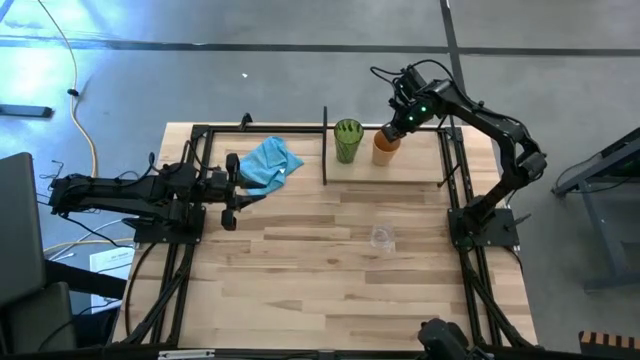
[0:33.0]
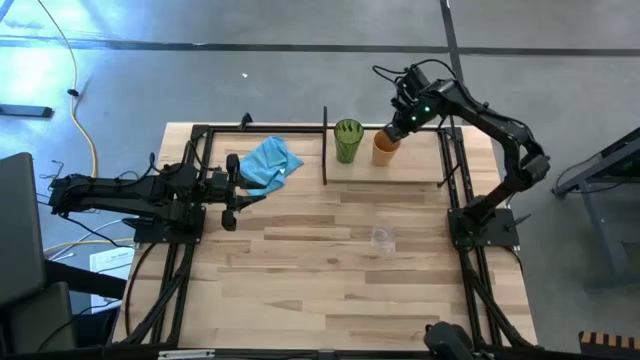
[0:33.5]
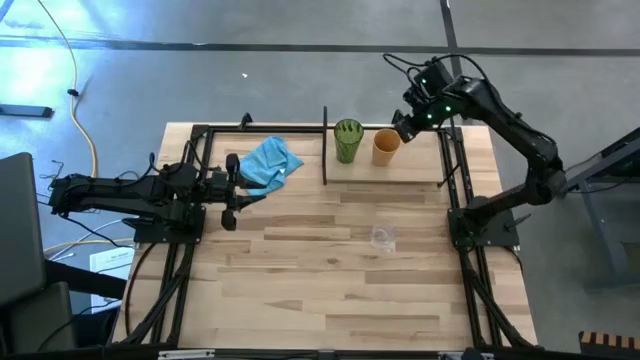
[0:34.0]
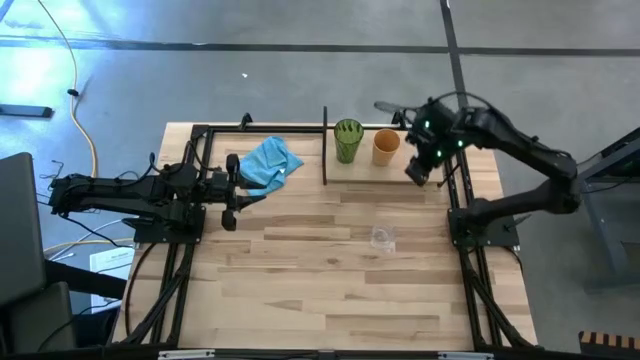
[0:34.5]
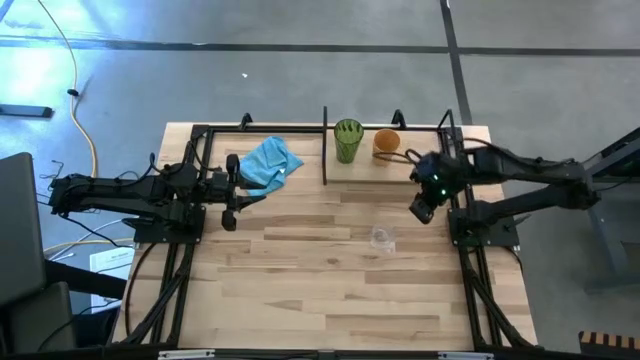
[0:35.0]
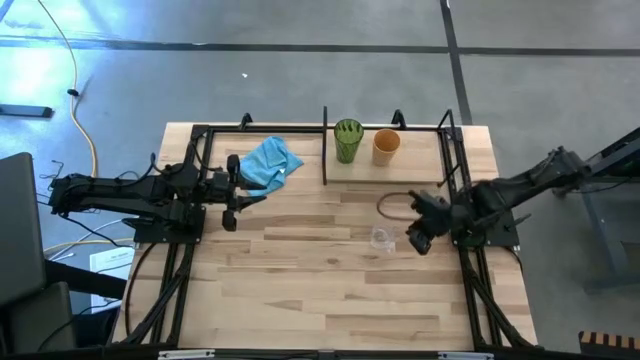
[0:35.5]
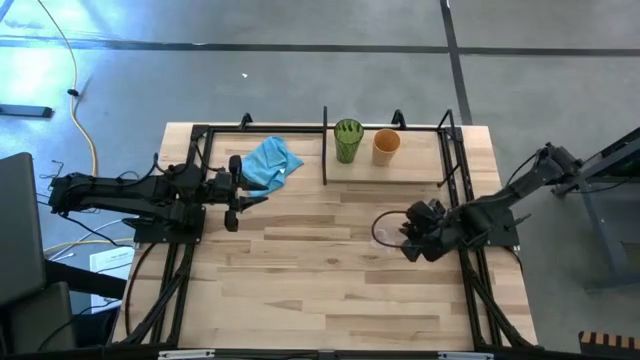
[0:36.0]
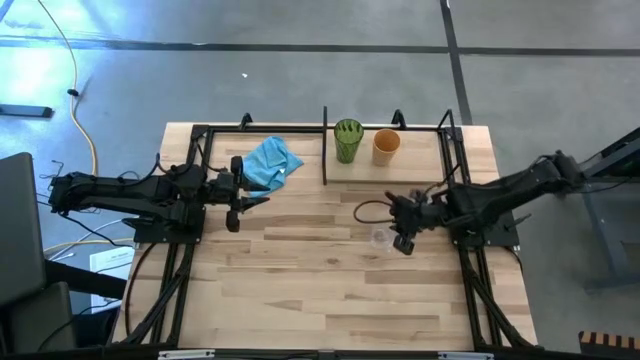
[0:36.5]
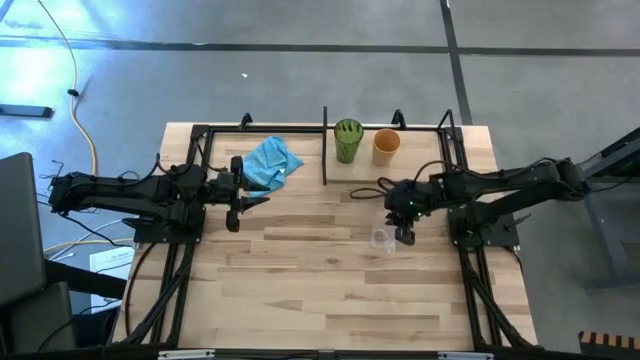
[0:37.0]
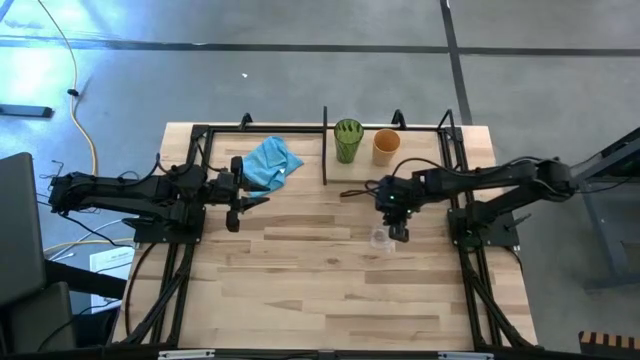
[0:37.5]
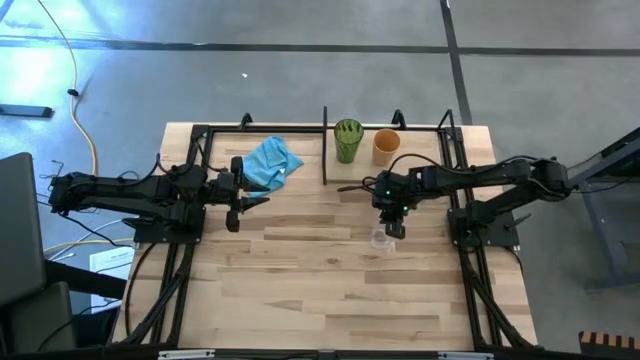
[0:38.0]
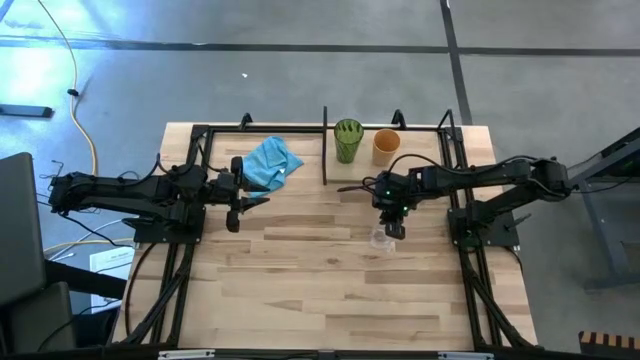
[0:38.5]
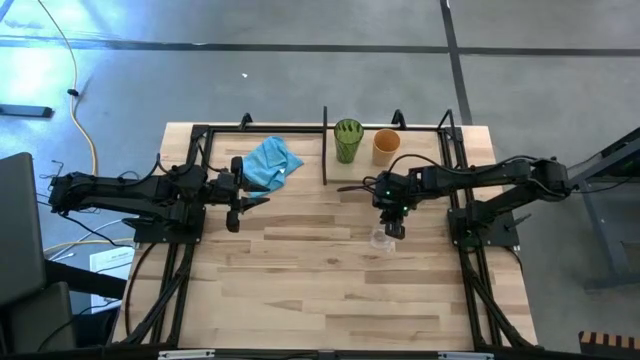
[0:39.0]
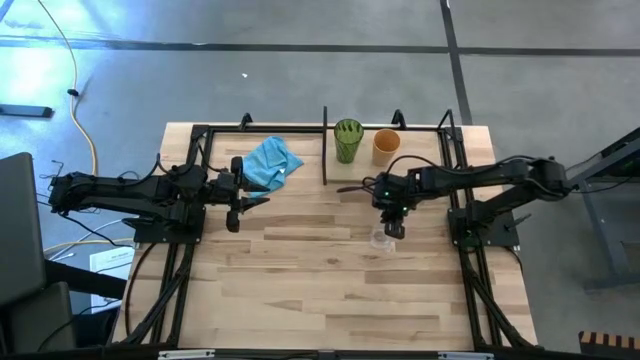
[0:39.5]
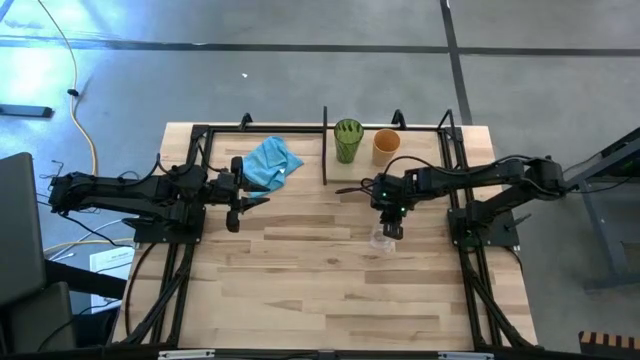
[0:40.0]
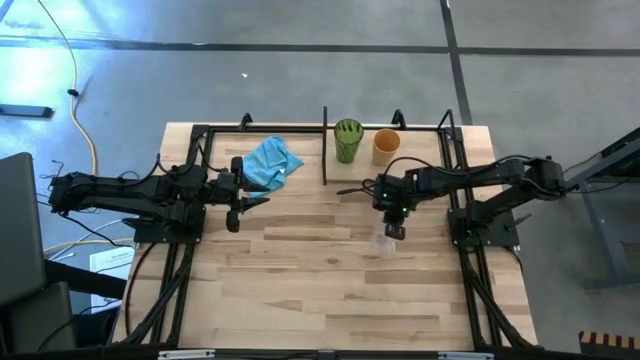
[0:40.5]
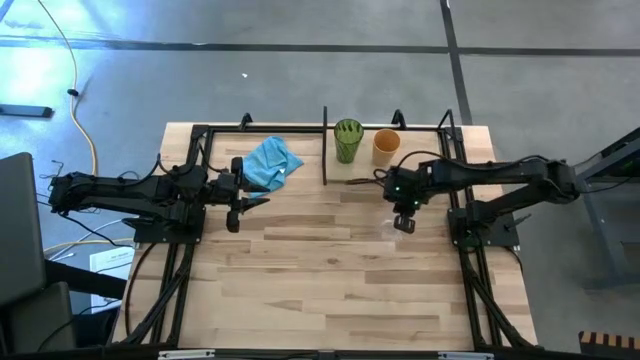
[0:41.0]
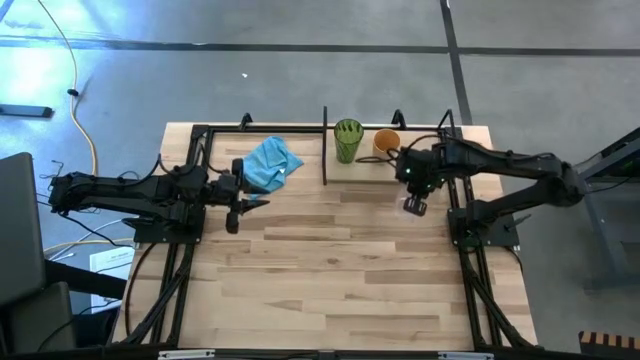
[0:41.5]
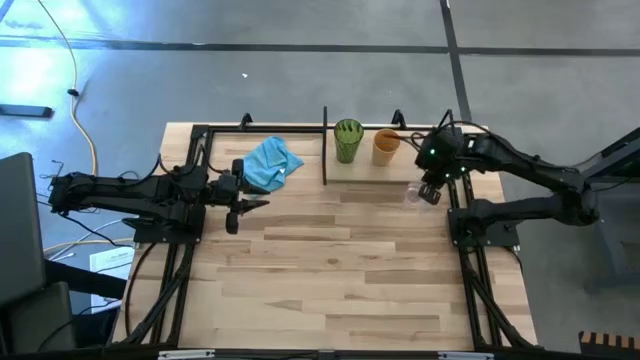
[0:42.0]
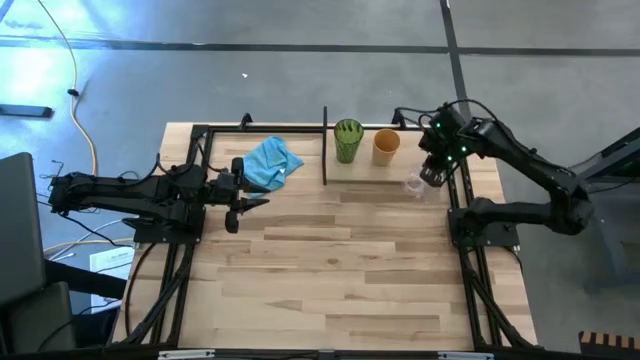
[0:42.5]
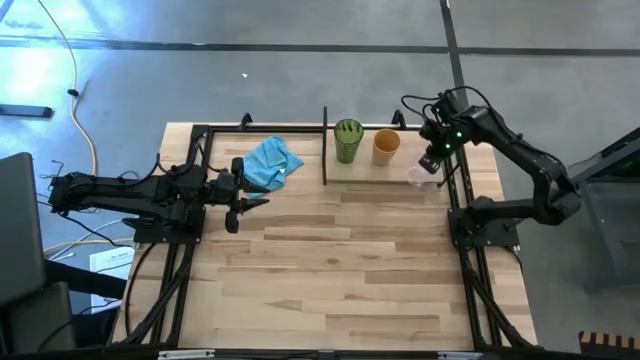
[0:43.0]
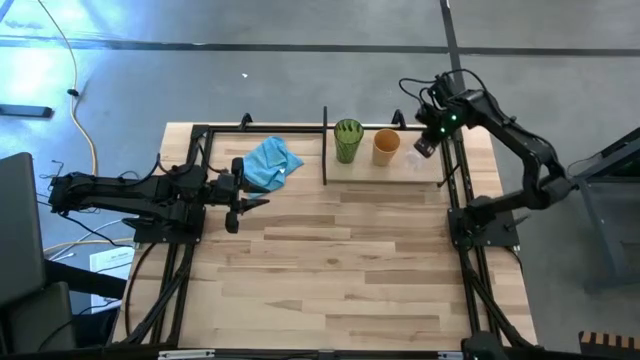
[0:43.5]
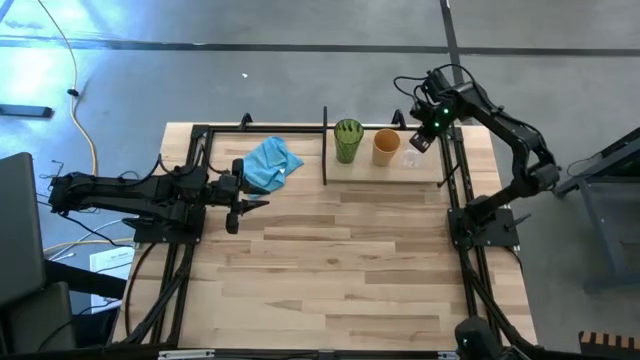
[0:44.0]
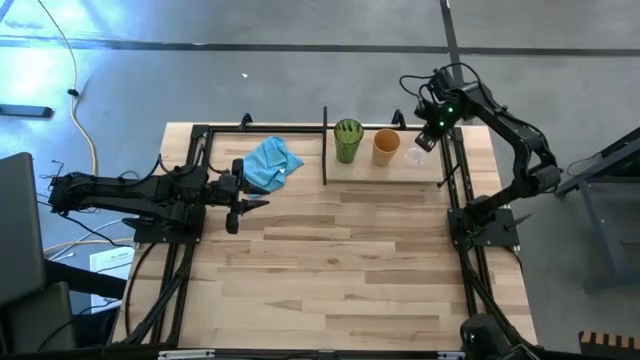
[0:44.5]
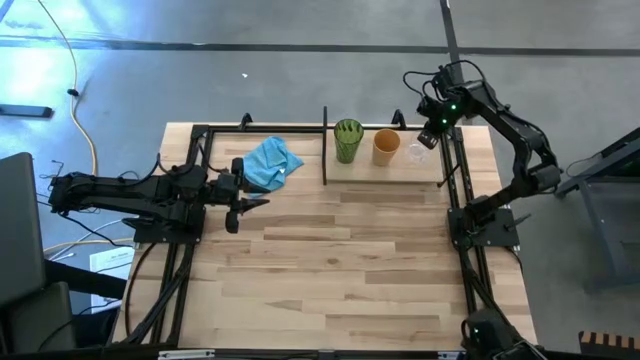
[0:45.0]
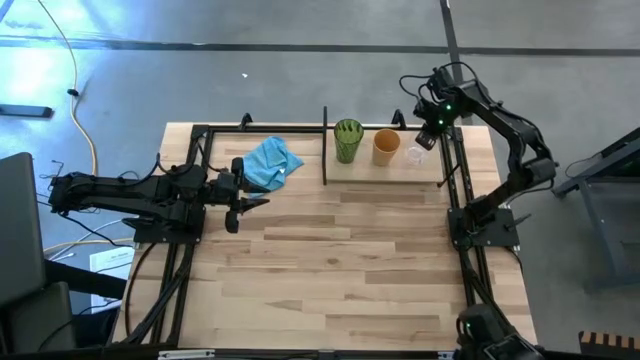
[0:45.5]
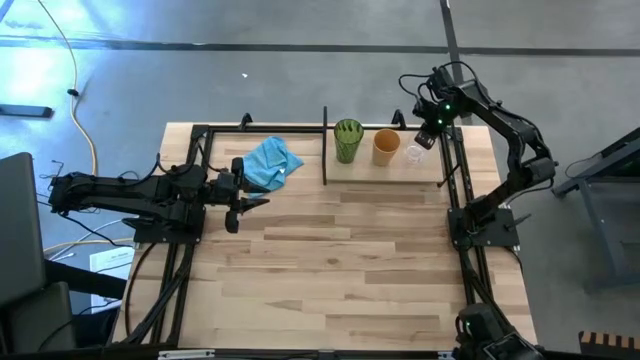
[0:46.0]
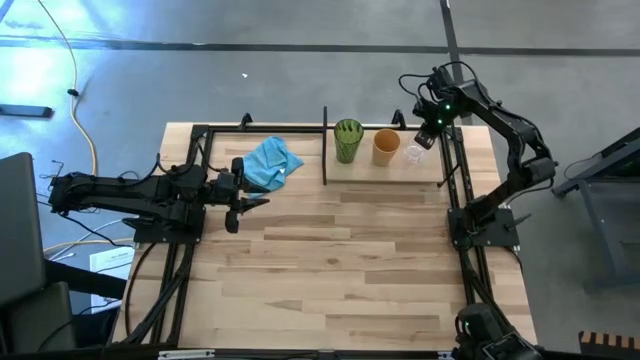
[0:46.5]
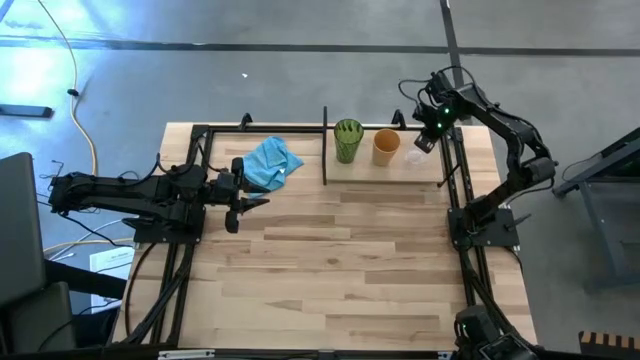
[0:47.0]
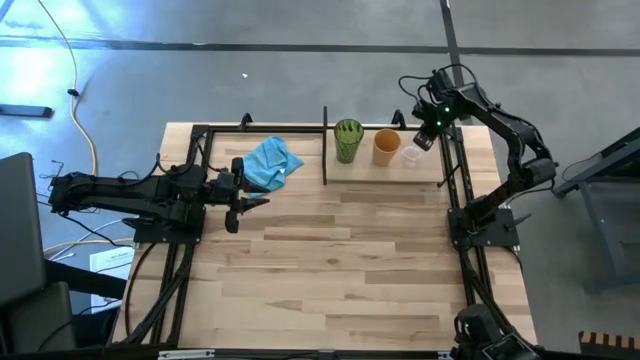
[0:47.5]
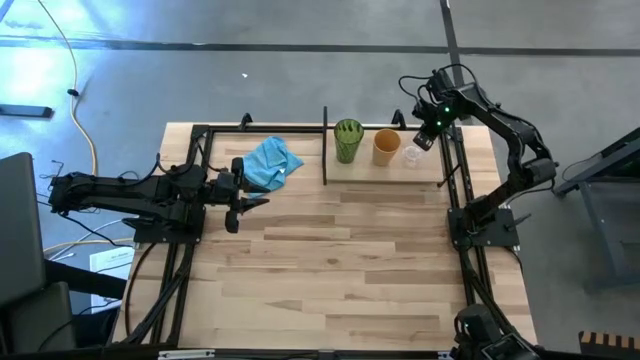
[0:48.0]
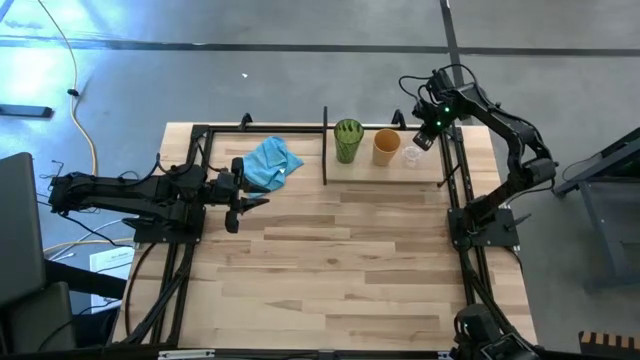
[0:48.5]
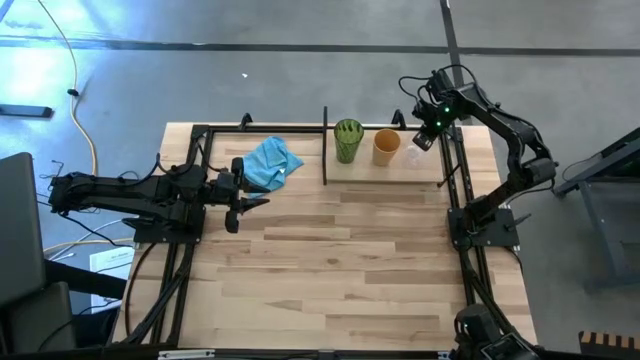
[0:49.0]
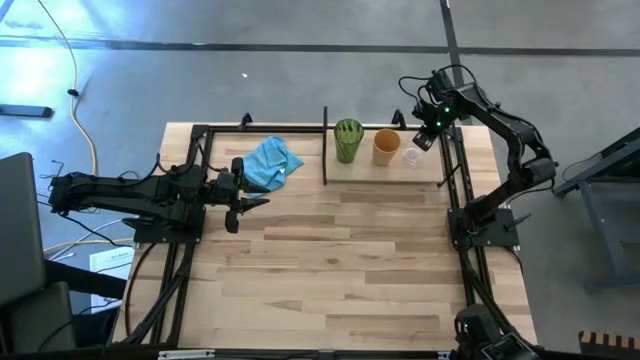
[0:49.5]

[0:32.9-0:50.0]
Task: Stack small to large cups/mugs on shelf
Put the transparent mug on the shelf

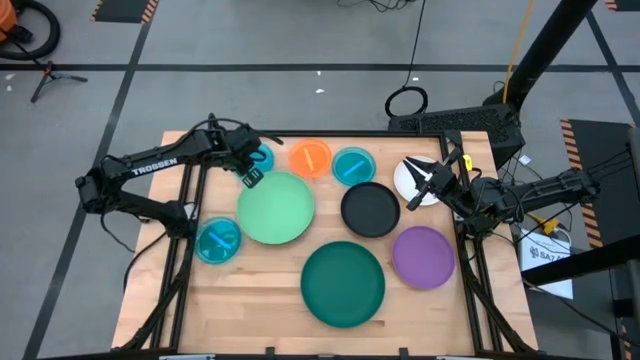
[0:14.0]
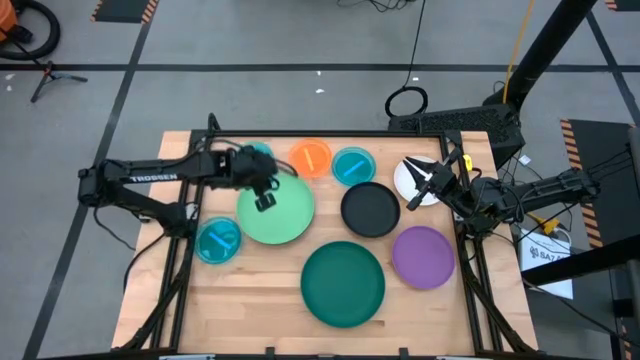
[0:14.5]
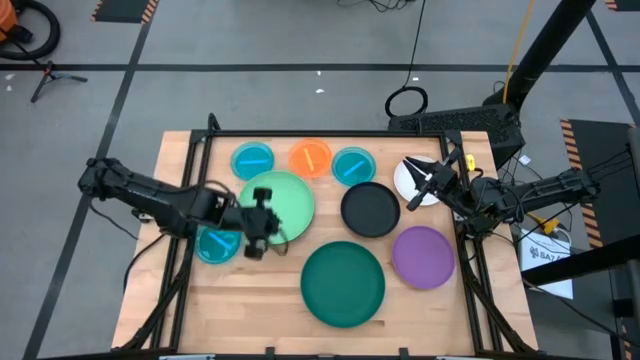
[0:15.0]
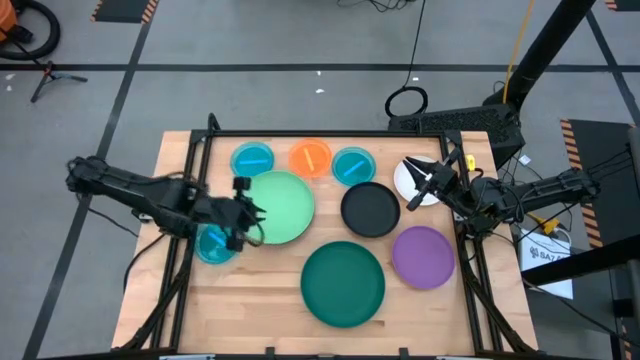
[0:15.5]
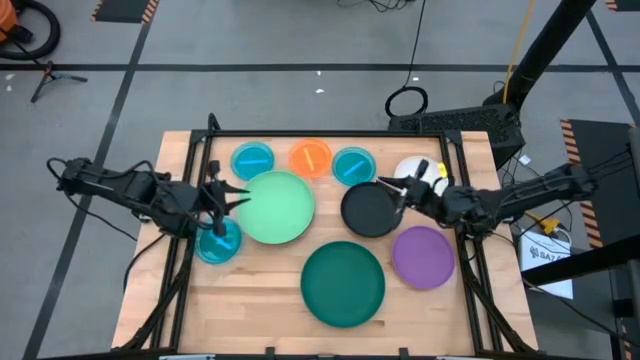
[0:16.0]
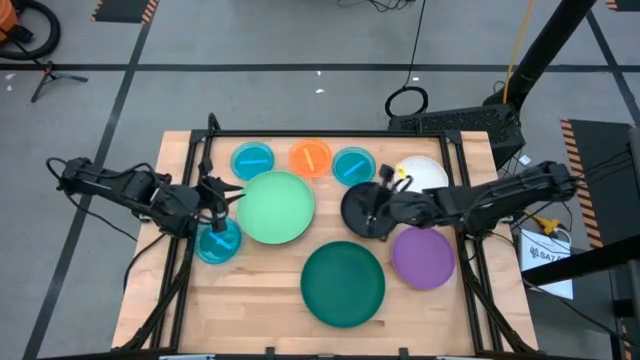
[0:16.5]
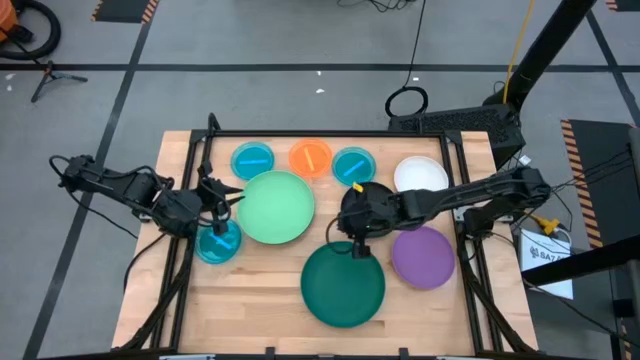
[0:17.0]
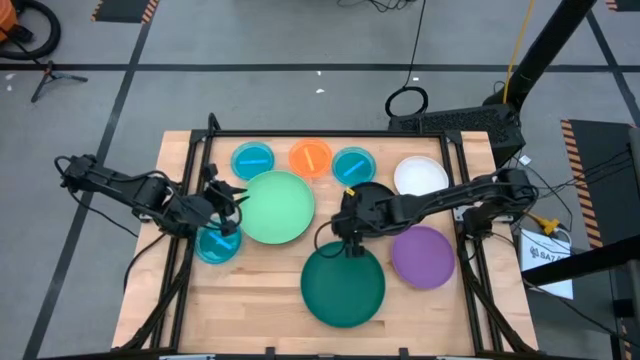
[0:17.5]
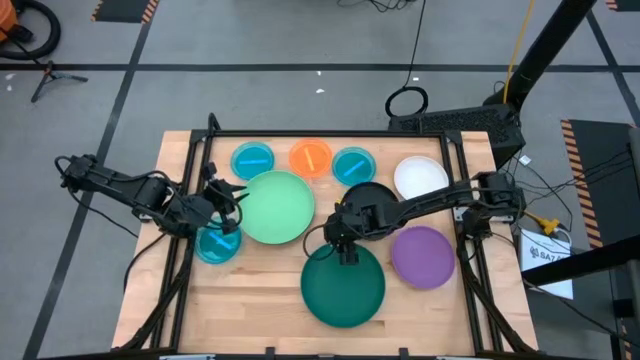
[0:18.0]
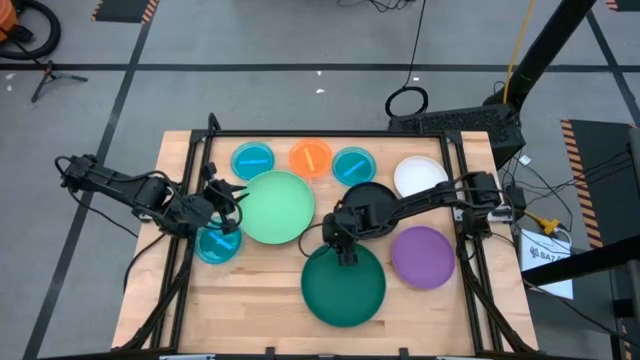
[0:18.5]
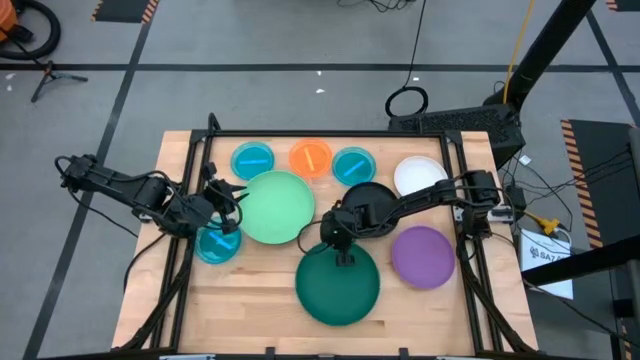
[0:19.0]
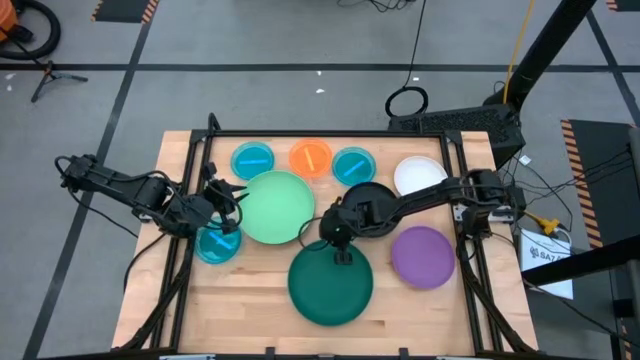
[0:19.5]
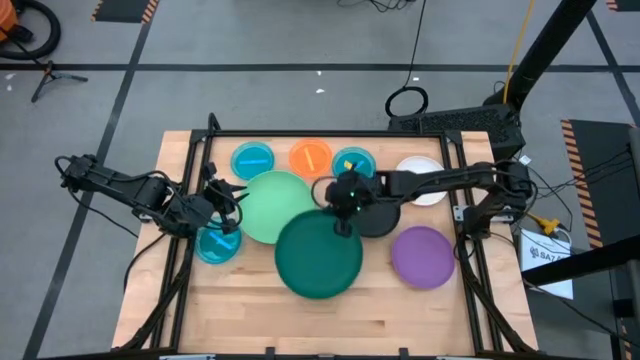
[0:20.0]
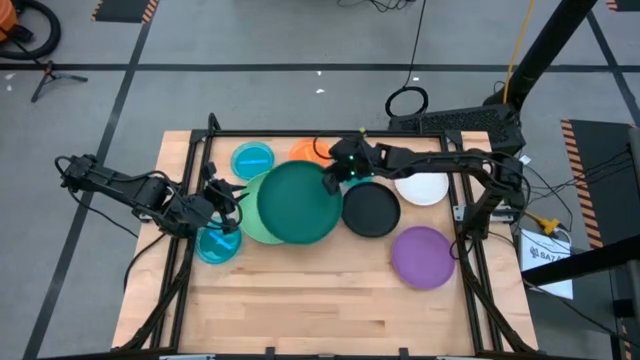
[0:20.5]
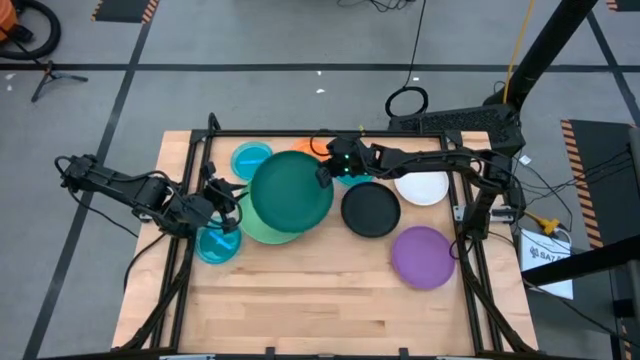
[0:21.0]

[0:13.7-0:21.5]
Task: Stack plastic plates
Stack the dark green plate on top of the light green plate
